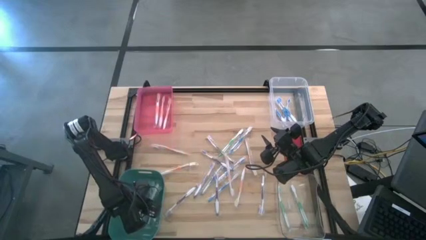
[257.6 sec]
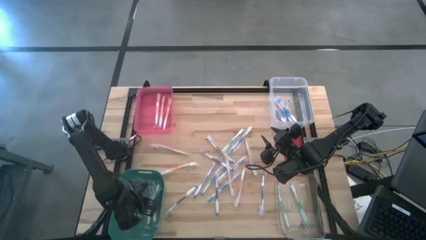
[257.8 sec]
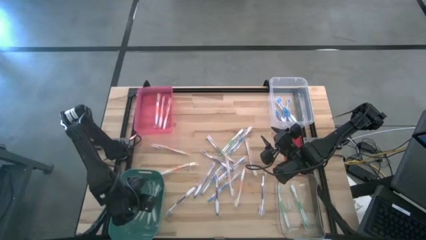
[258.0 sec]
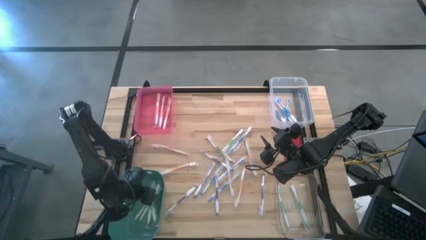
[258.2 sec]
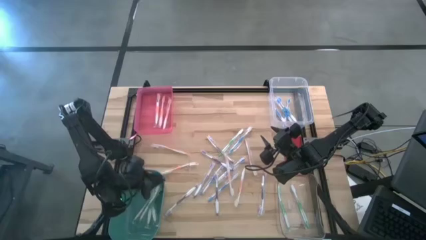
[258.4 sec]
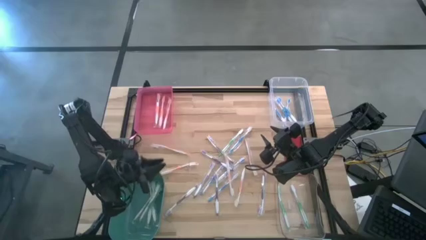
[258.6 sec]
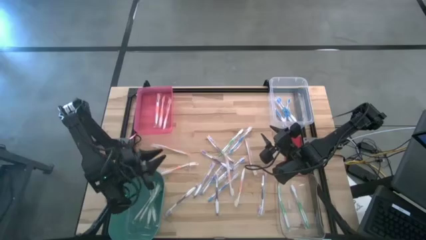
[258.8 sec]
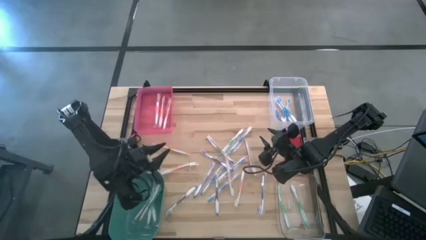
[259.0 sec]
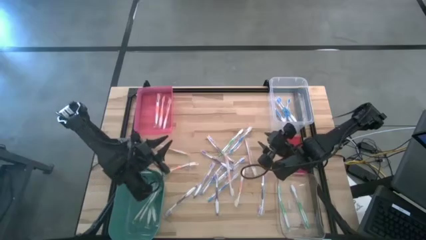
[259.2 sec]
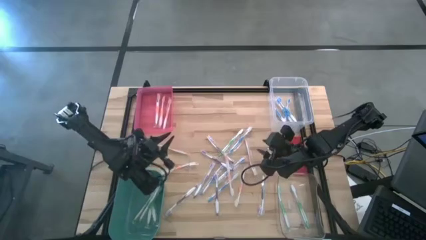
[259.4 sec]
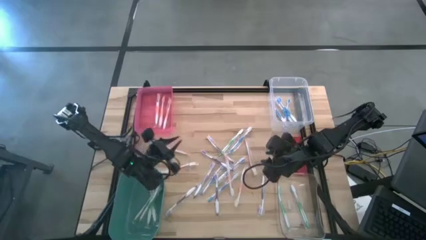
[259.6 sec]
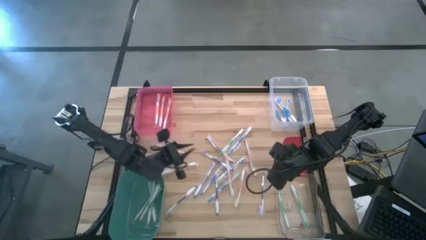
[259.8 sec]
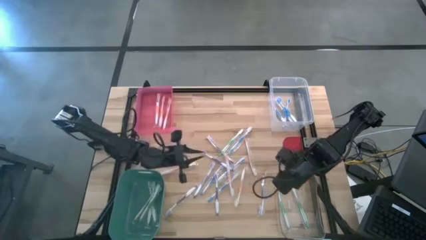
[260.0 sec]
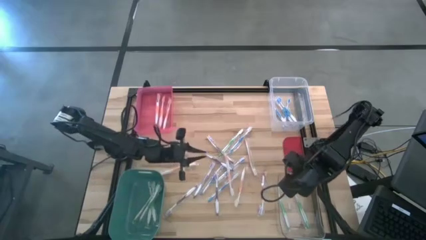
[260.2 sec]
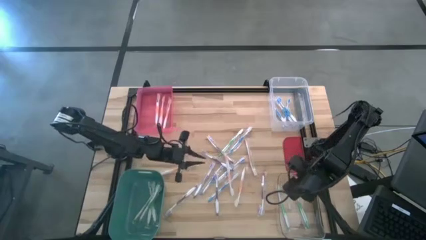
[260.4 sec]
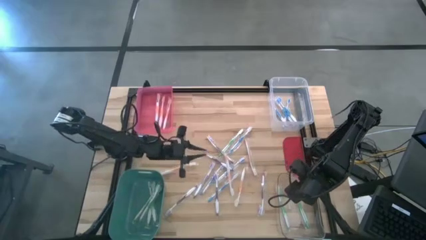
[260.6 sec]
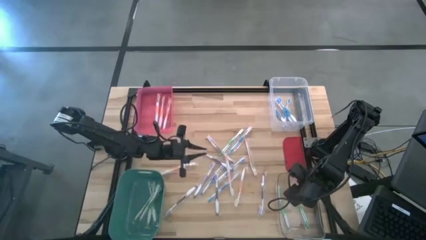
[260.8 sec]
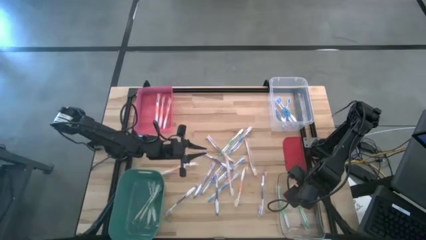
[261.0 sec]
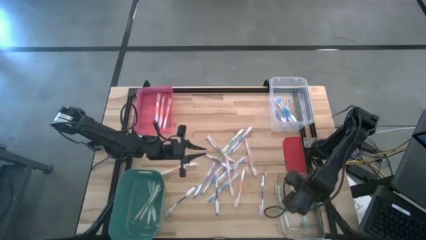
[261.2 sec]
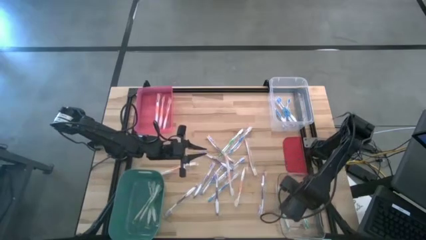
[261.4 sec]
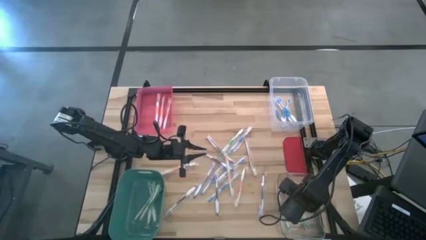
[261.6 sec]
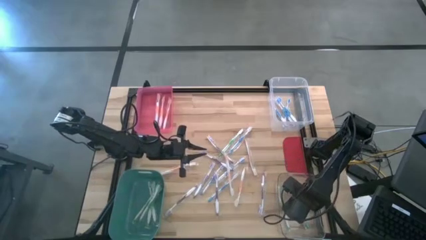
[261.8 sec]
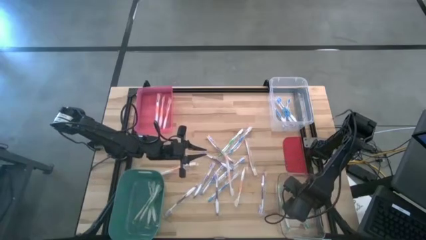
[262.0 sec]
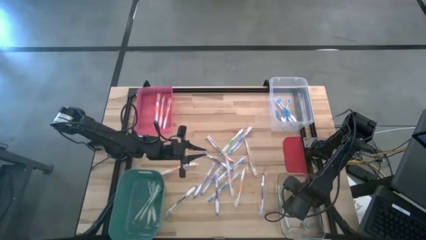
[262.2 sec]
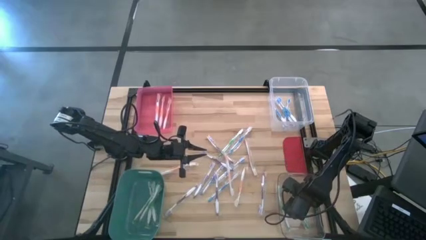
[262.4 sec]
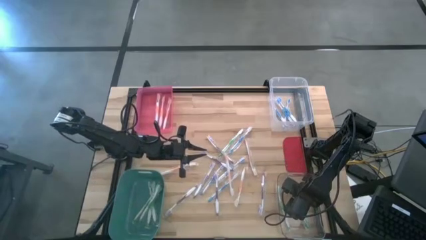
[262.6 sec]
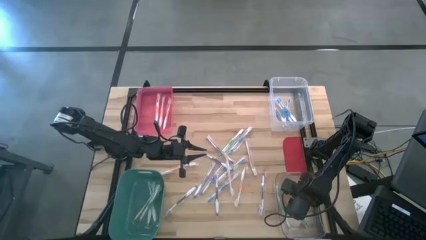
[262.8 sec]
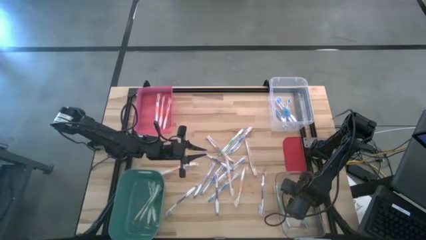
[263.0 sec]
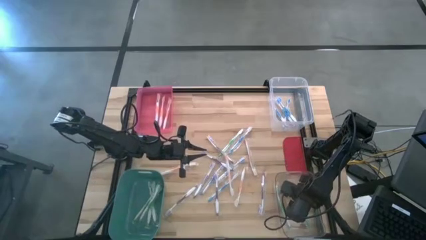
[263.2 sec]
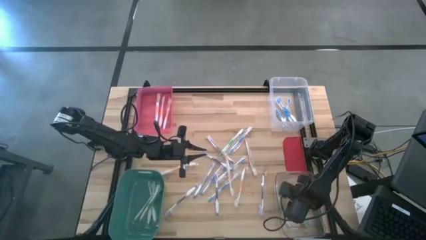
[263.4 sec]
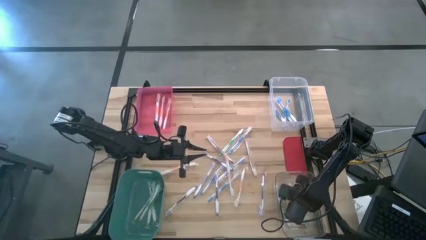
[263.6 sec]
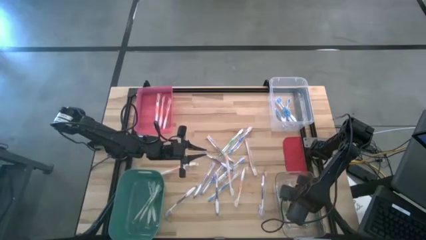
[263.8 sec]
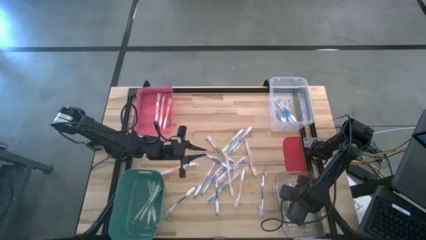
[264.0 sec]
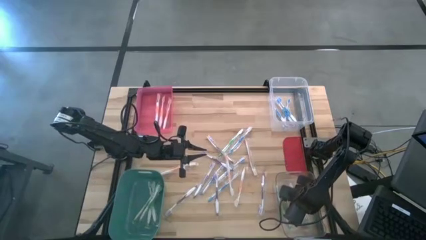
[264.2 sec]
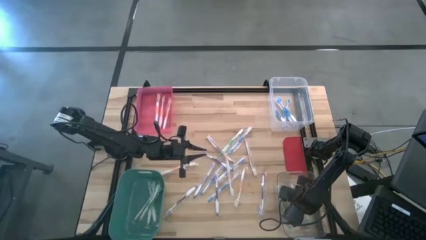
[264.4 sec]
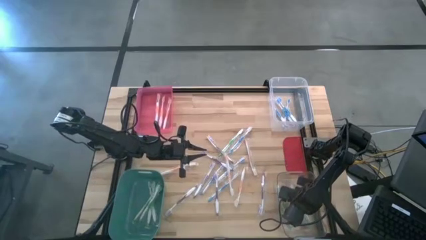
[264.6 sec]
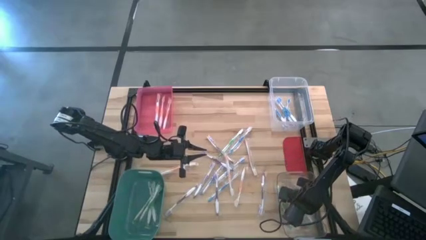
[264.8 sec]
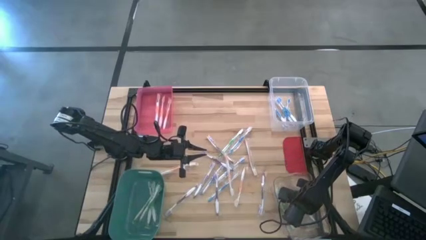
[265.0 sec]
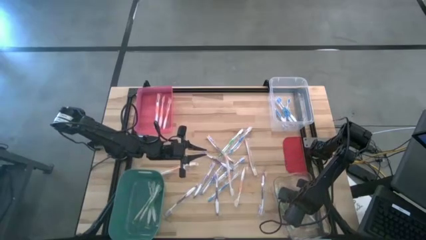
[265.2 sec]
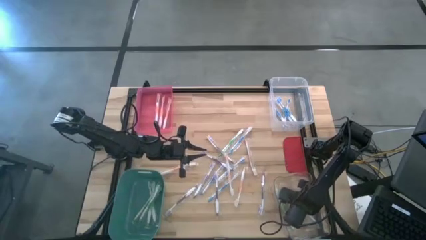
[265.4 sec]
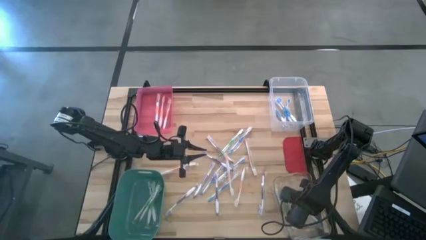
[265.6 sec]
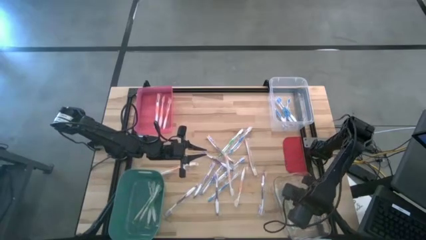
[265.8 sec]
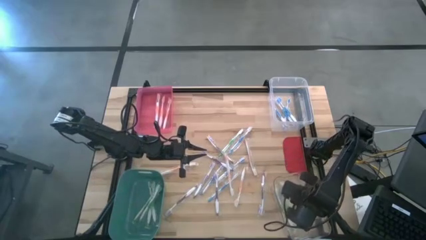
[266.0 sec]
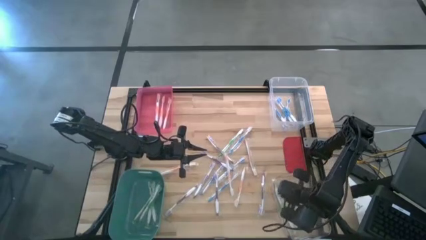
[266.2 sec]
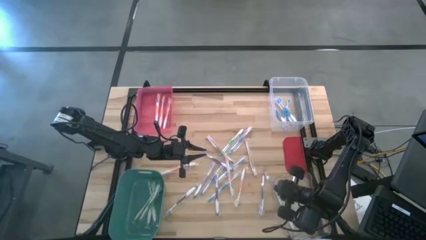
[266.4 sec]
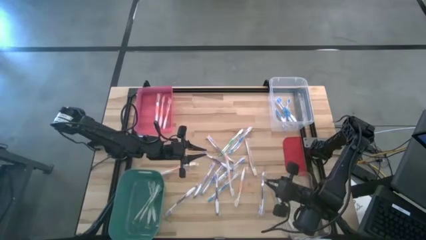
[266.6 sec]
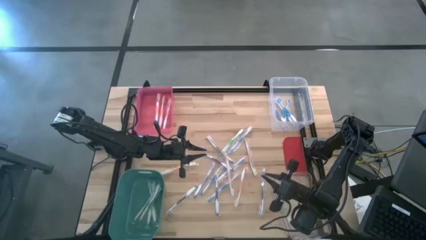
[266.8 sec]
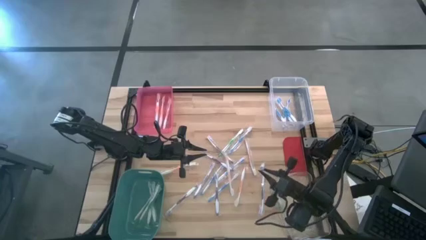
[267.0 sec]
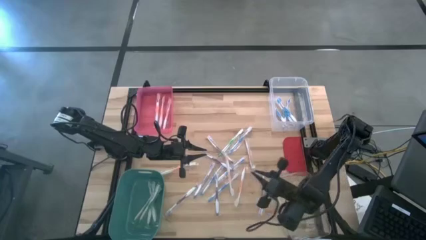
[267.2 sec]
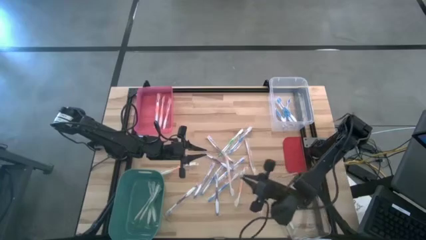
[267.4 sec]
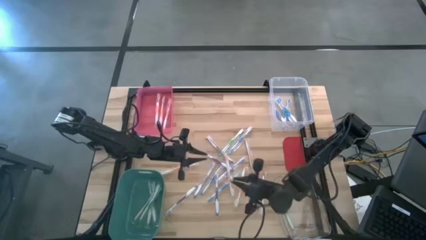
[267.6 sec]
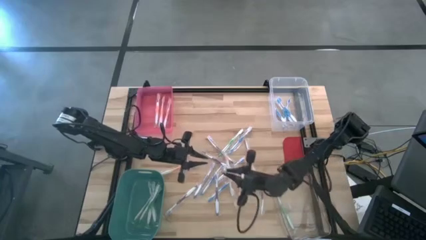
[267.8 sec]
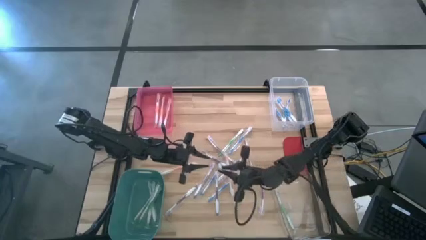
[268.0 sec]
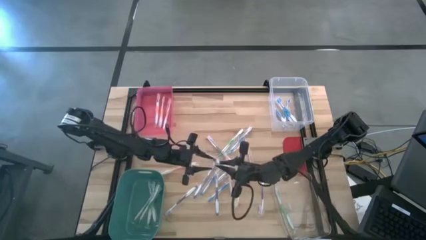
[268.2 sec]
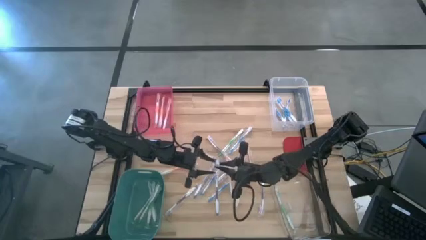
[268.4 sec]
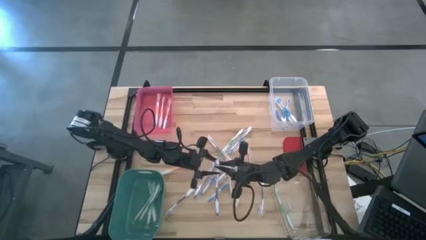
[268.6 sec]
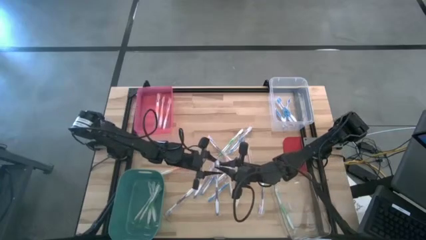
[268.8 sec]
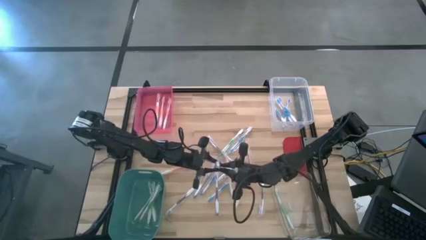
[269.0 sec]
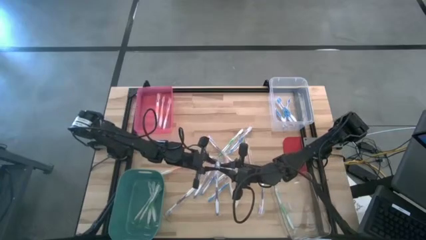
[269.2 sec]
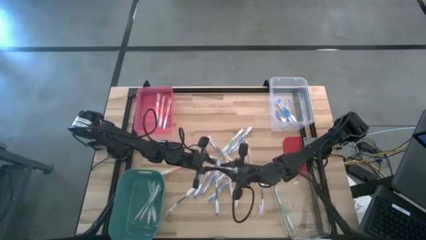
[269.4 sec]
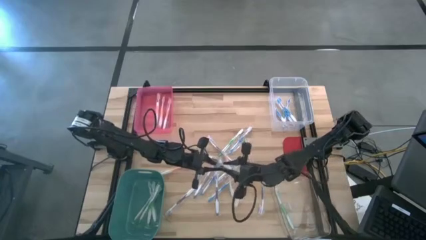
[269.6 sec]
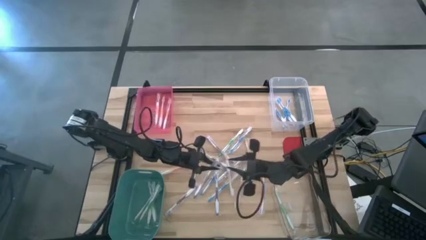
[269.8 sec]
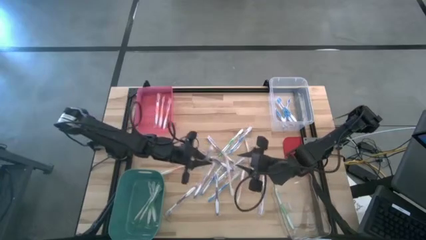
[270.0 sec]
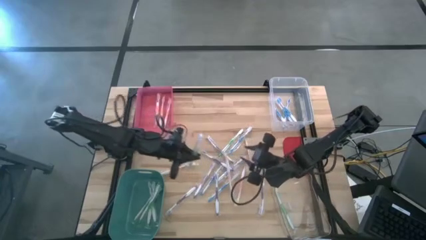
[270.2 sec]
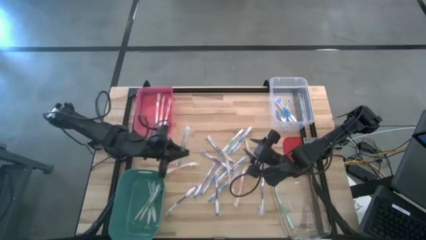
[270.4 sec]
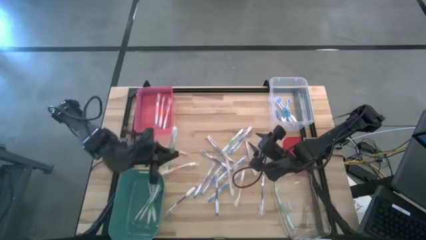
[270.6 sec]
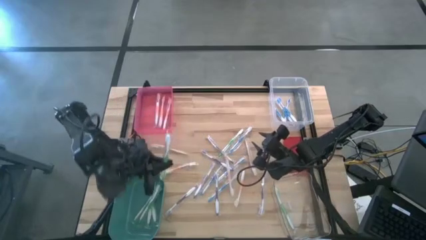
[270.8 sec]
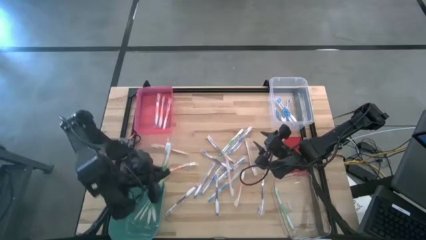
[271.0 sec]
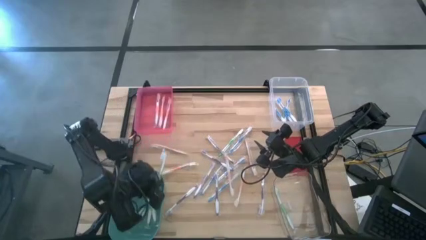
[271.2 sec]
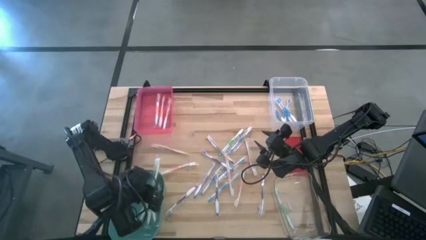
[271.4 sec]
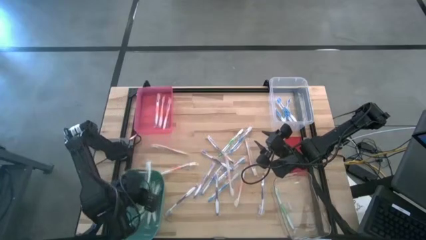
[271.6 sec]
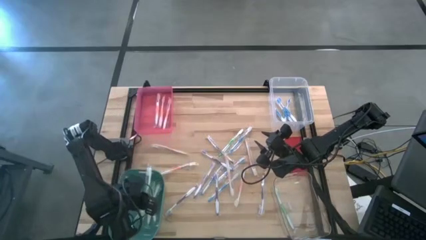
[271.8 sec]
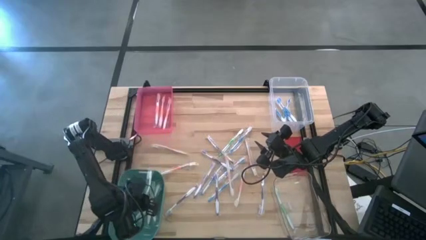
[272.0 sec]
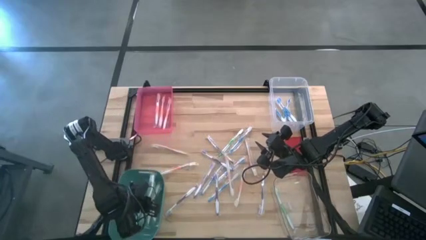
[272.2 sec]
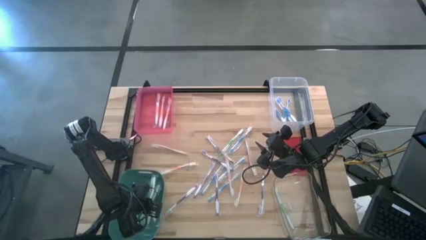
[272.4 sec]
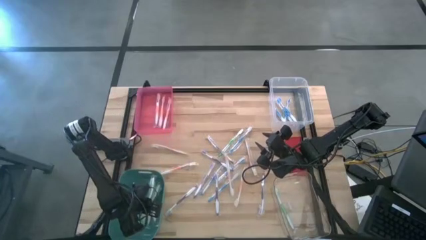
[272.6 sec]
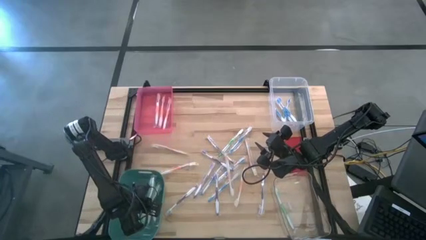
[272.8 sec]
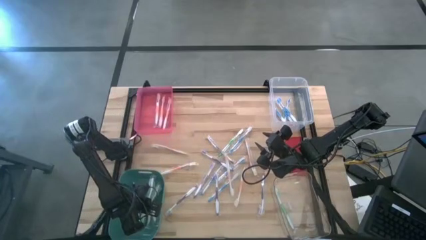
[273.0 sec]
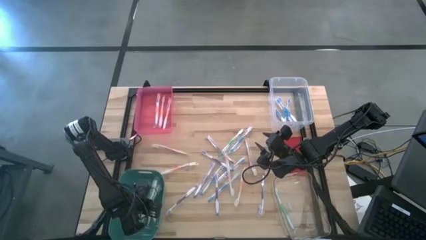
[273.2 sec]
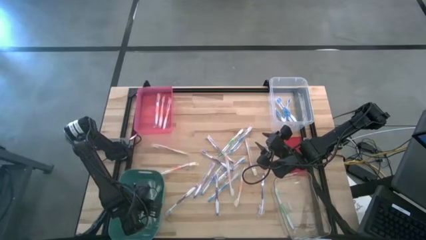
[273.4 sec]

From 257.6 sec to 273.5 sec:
Task: Pick & Place Toothbrushes
Put the green toothbrush into the green bin
